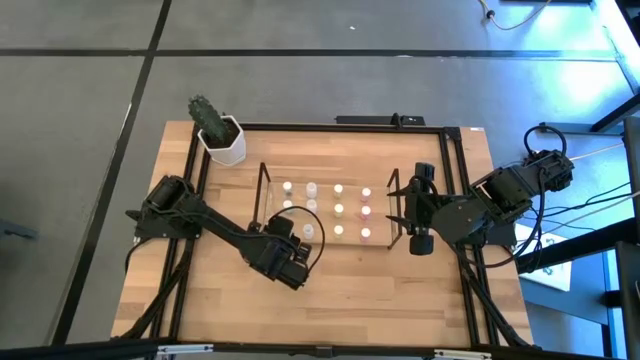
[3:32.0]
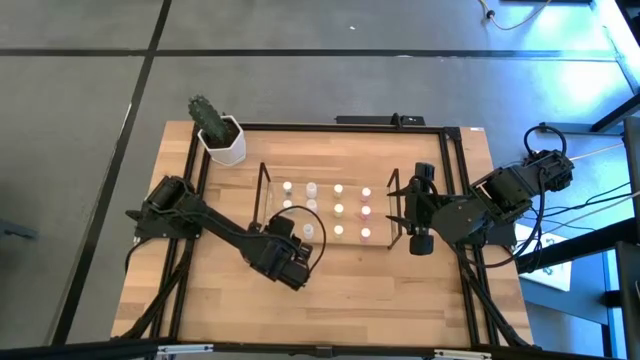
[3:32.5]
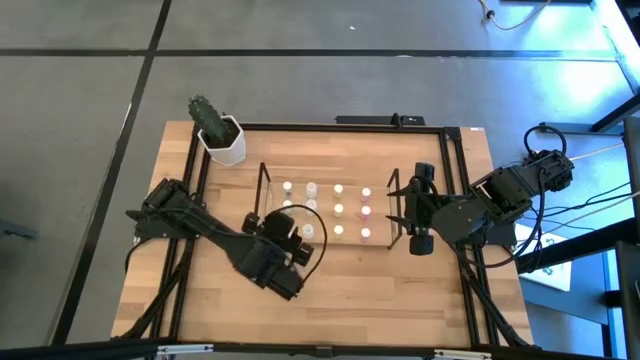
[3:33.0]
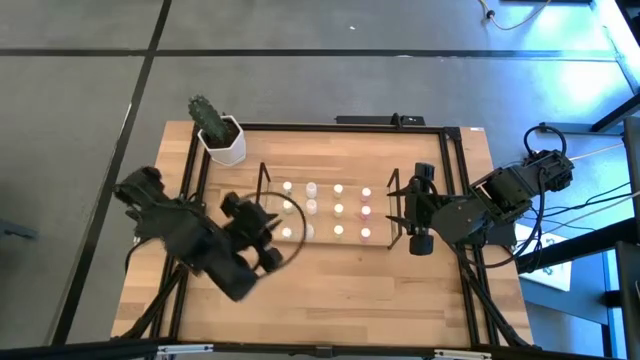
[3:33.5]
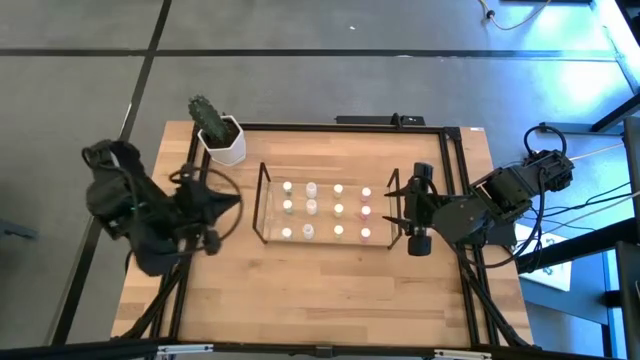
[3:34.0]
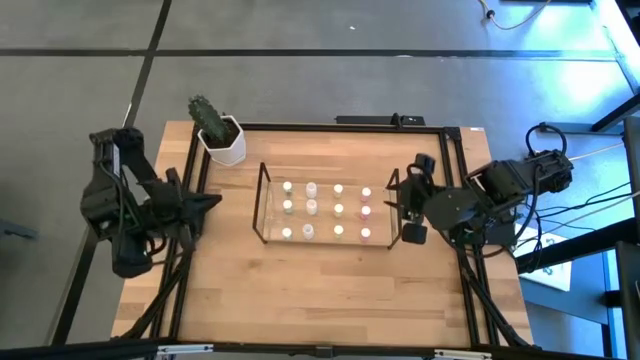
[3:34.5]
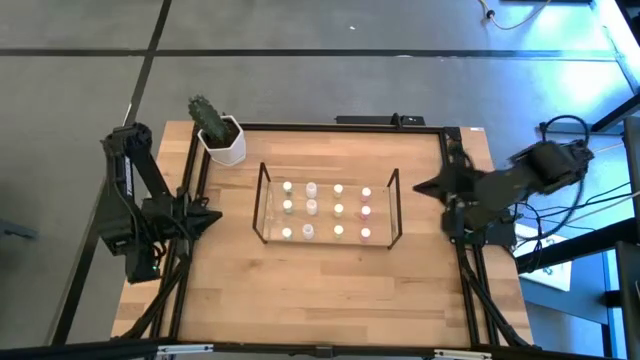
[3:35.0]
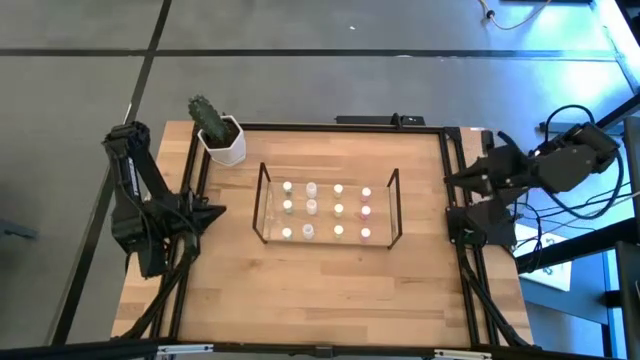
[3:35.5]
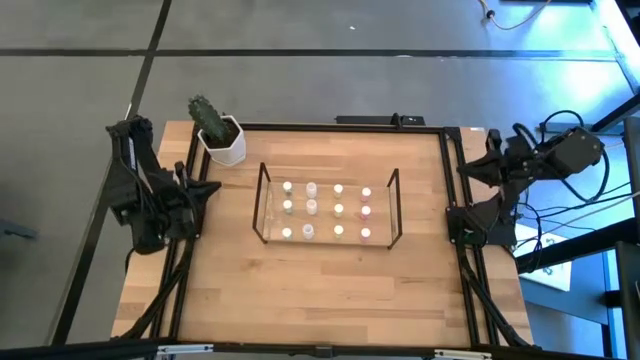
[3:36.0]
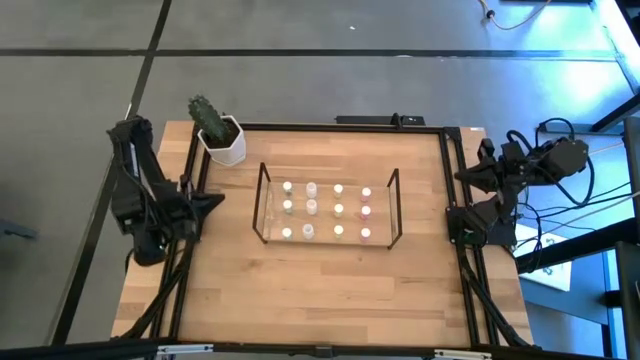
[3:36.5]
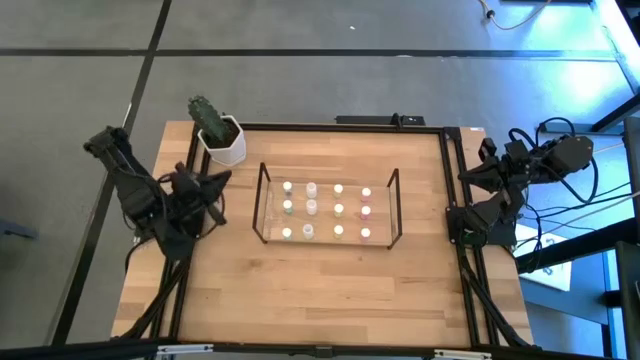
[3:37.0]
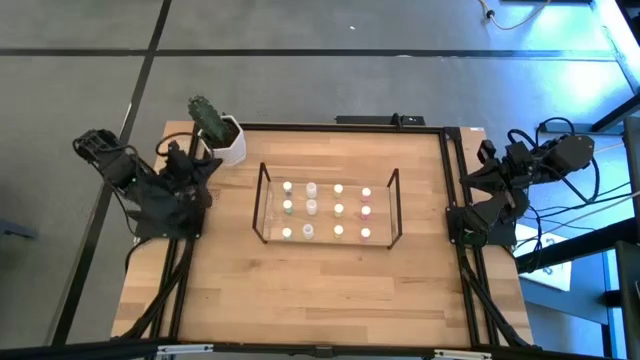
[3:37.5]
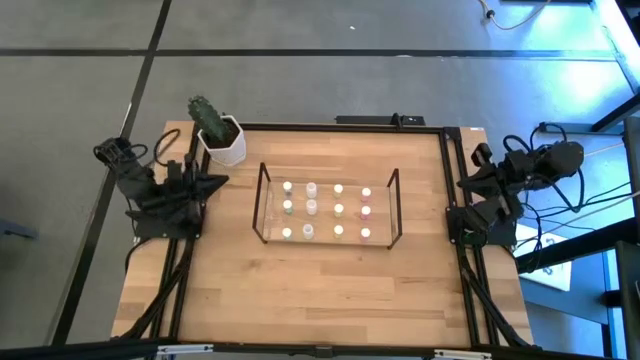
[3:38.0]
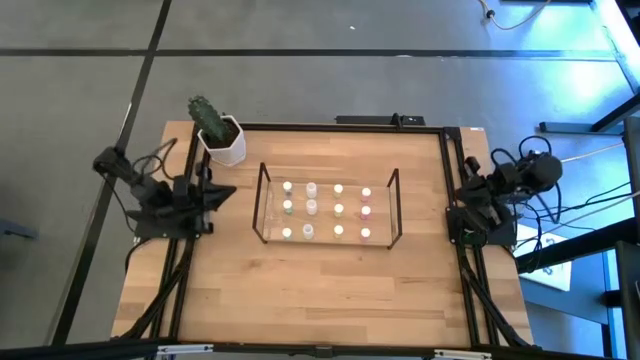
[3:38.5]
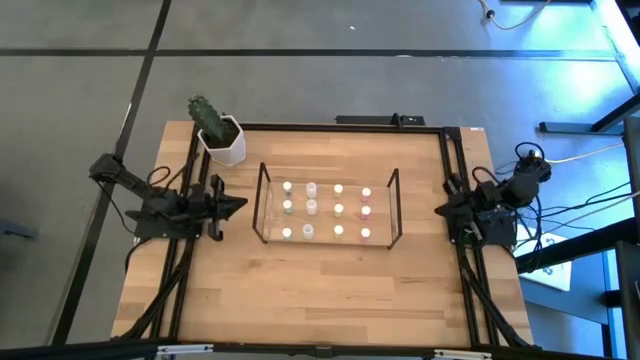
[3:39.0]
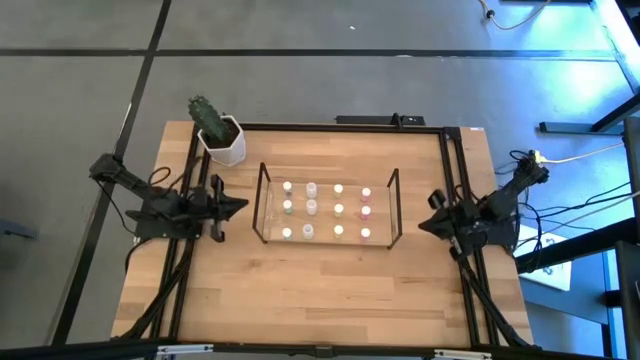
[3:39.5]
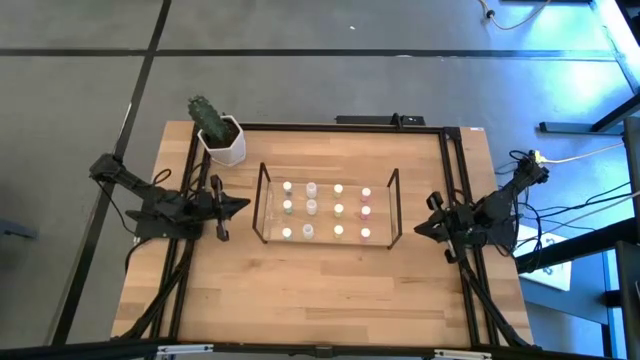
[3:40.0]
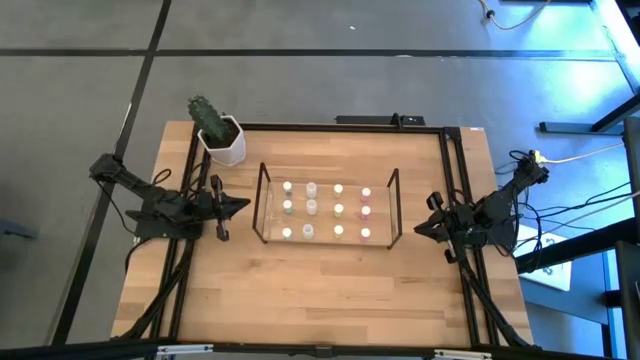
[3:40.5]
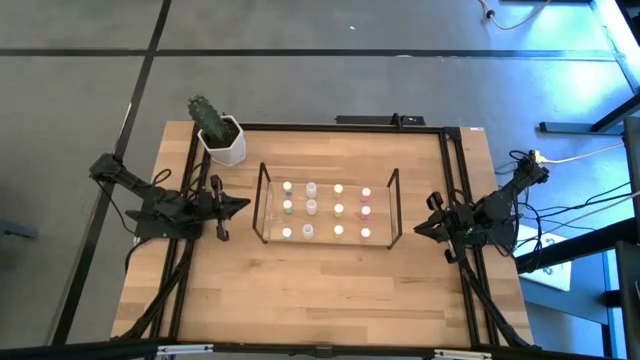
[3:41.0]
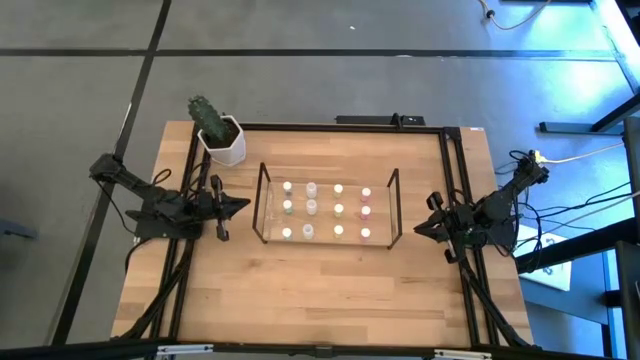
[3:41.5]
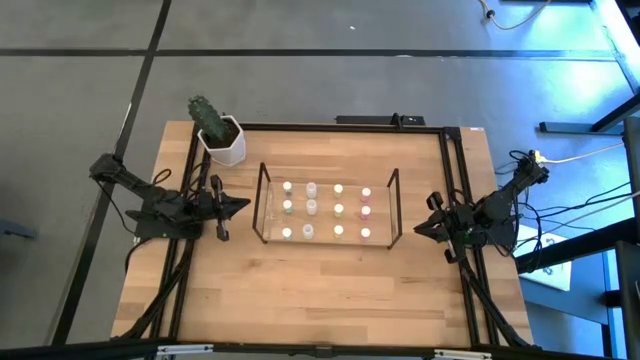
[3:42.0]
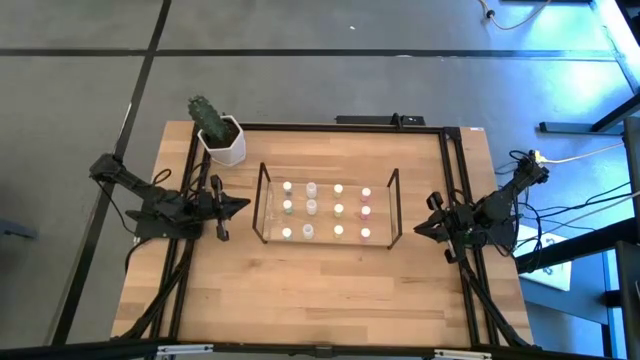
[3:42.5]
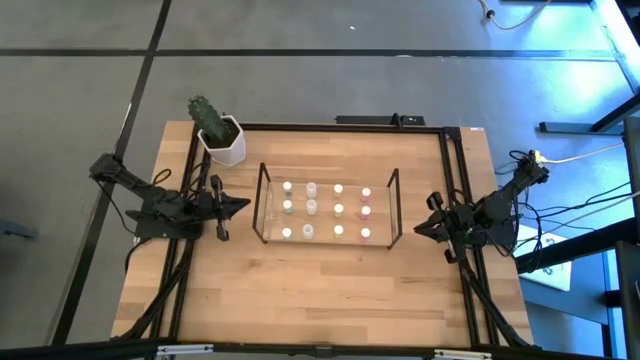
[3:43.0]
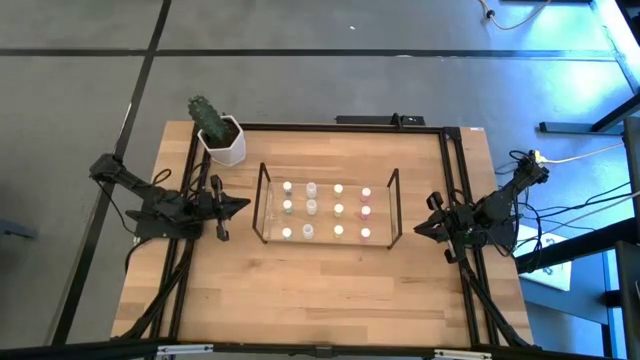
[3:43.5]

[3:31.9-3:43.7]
Task: Pick and place medicine bottles onto shelf by color
Return to Home Position

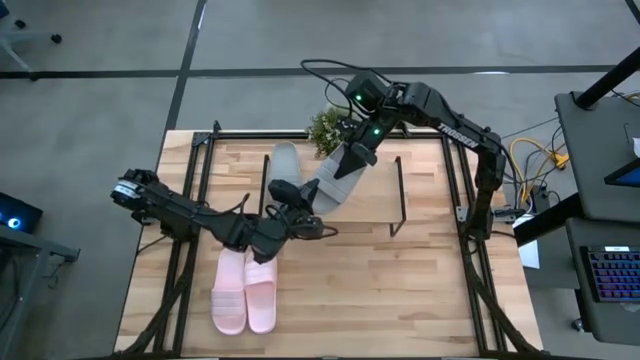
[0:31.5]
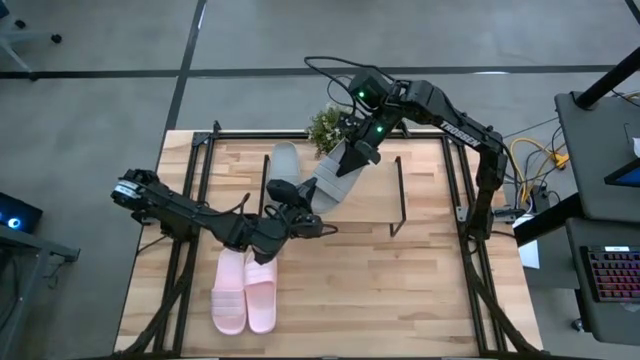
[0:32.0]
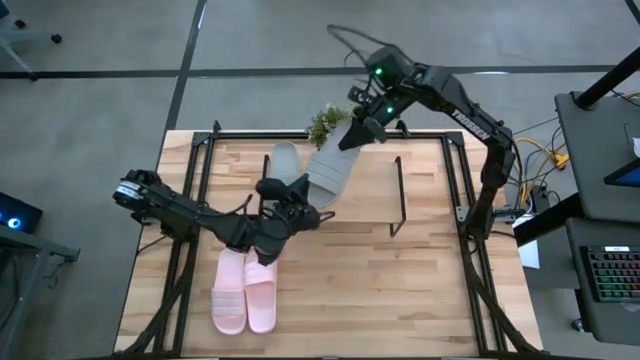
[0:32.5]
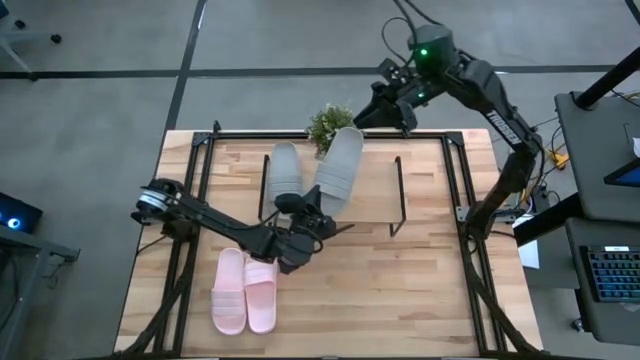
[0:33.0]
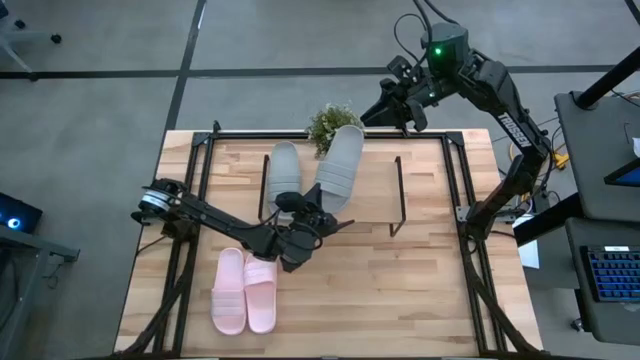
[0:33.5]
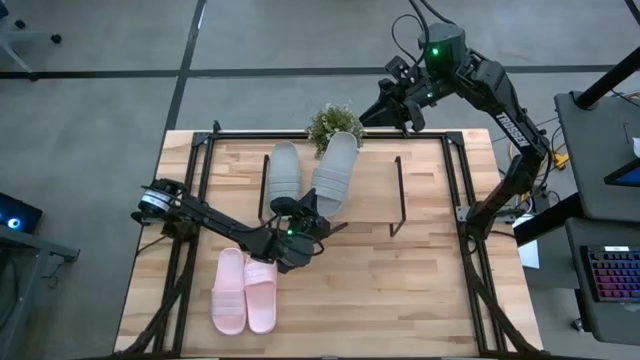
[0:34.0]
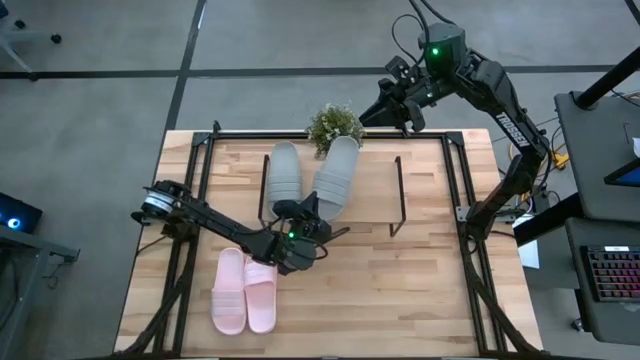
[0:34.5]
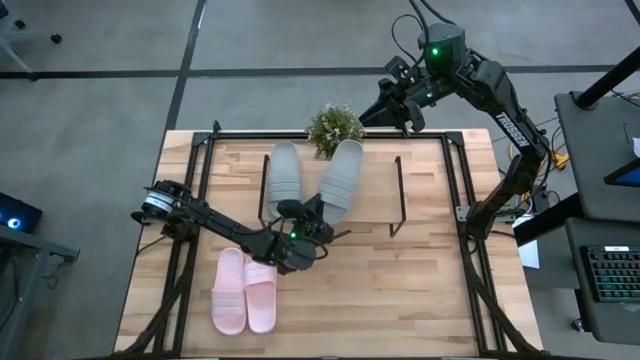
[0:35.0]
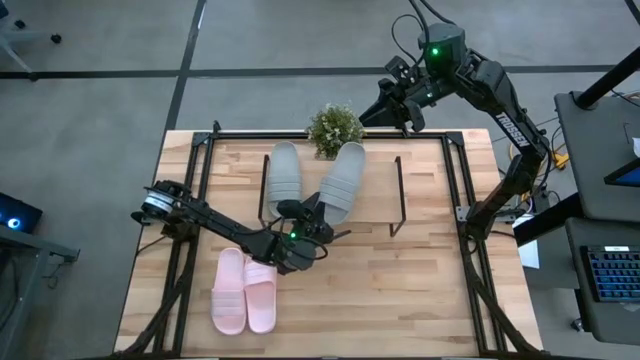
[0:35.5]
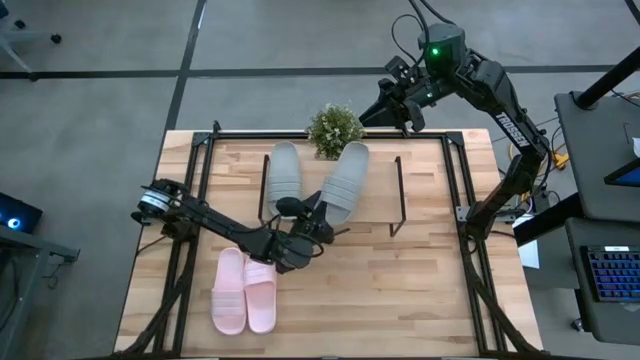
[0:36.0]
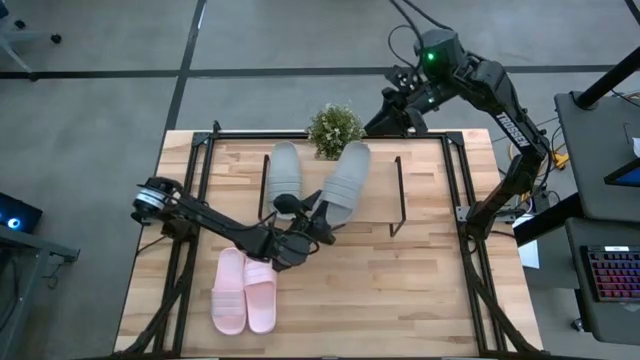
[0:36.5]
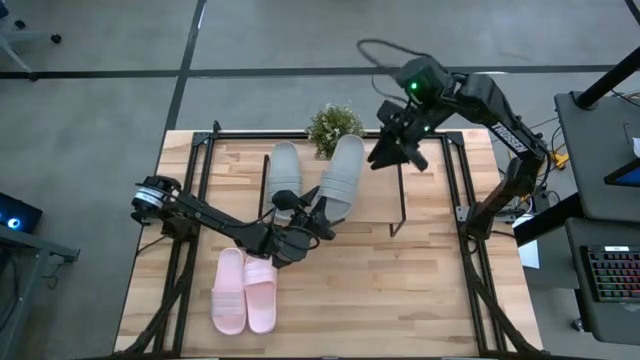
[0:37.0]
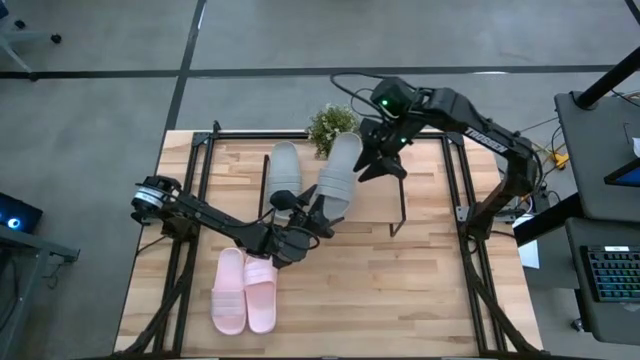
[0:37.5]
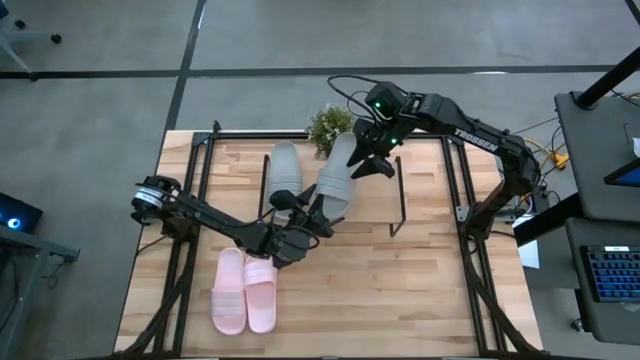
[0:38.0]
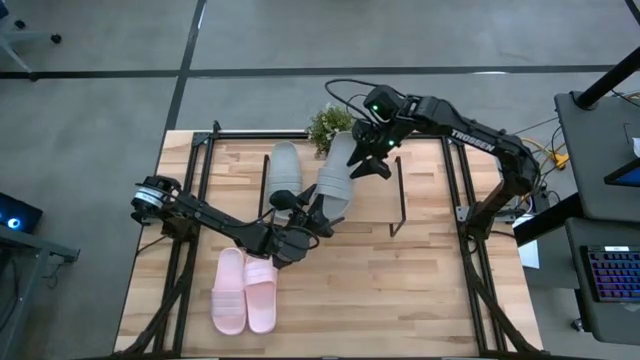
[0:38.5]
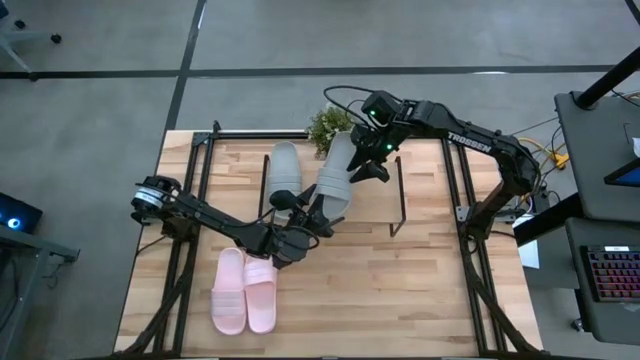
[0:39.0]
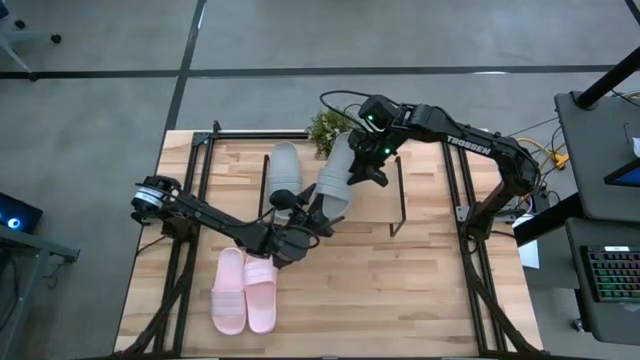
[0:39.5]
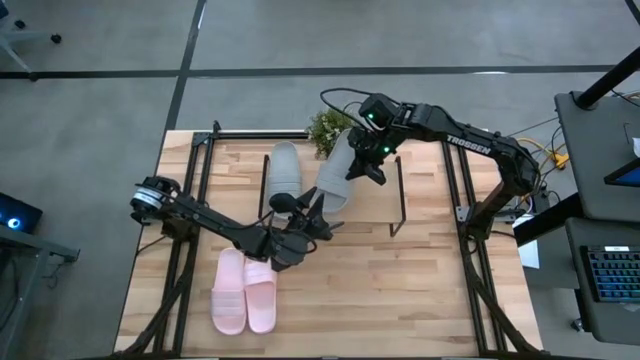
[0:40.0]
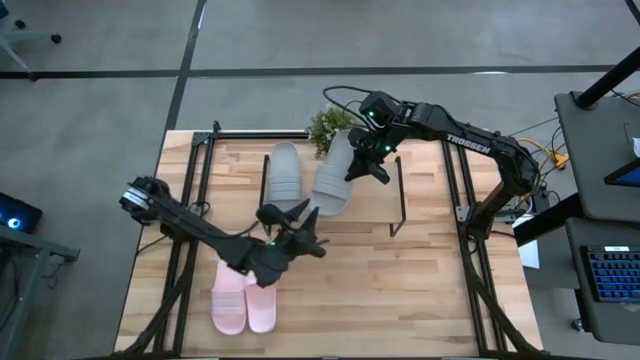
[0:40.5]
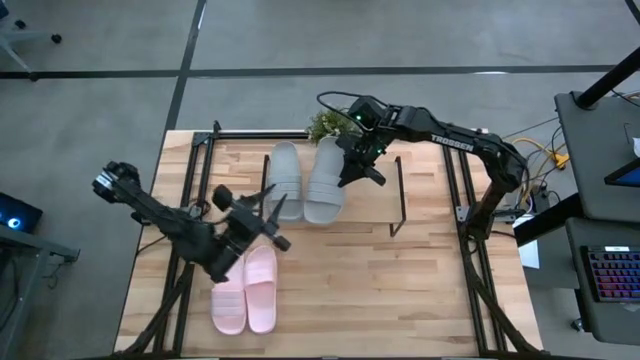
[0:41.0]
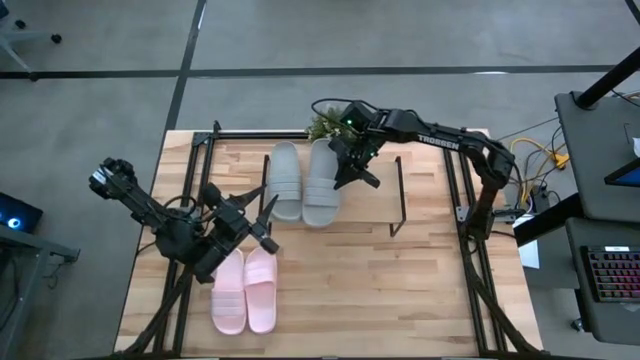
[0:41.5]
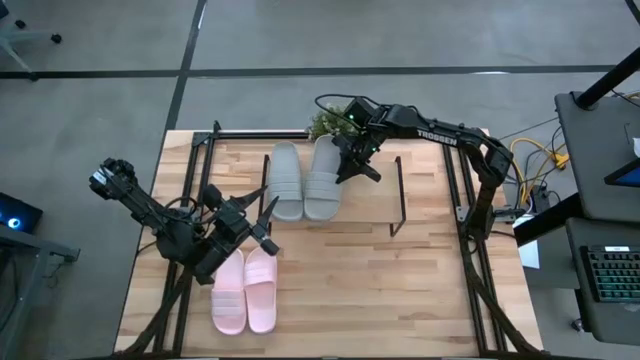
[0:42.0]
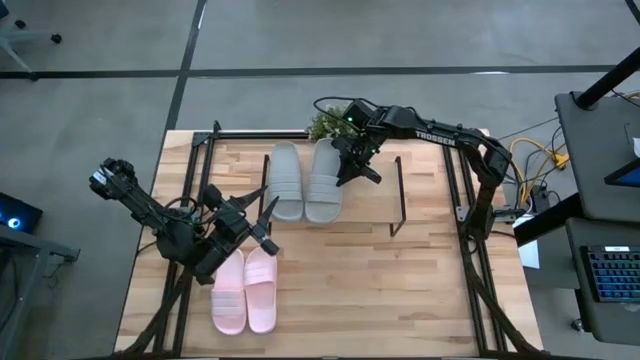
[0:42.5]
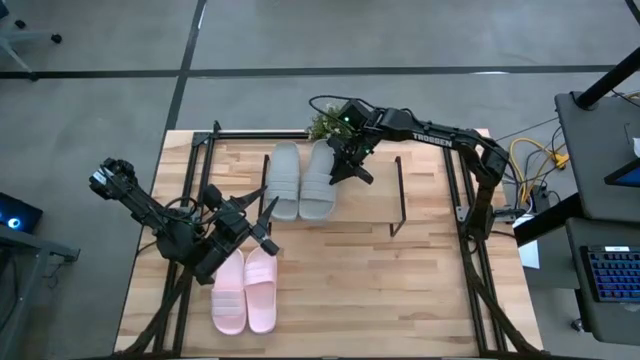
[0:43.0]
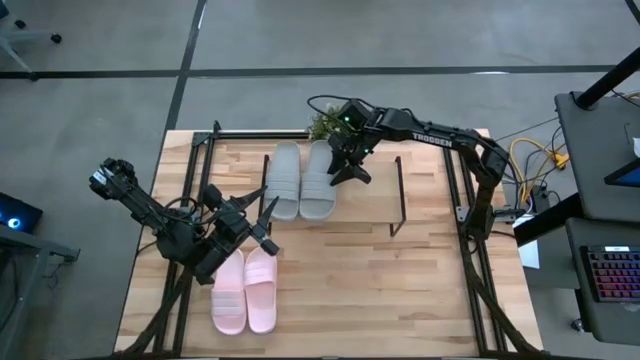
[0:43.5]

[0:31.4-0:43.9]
Task: Pick and place slides into the shelf
Put the left gray slipper on the shelf
